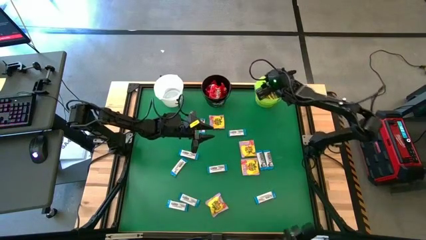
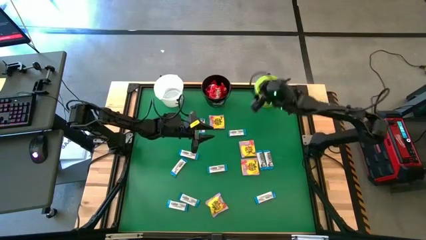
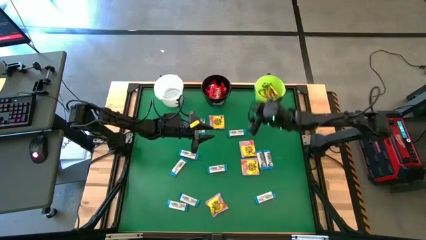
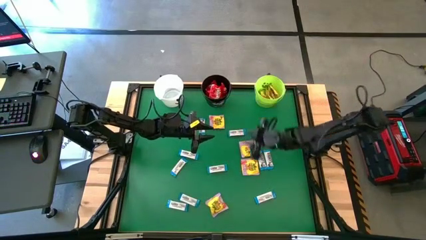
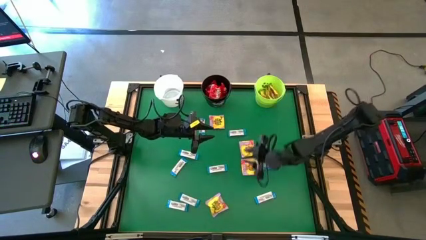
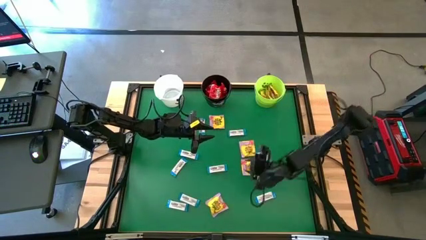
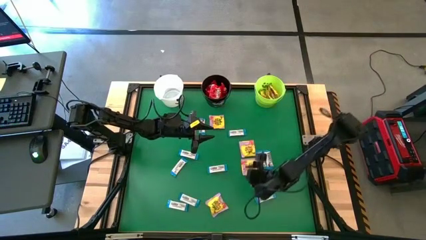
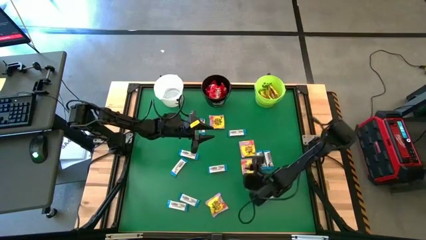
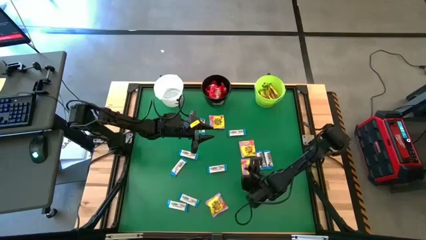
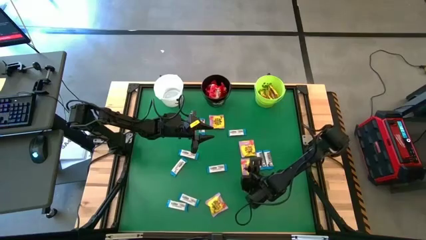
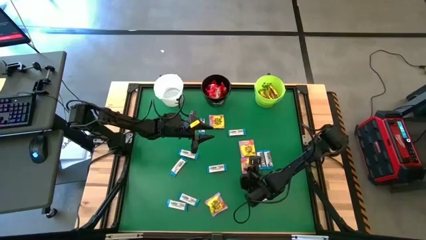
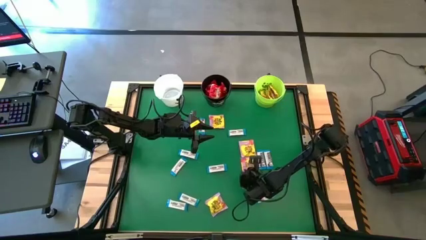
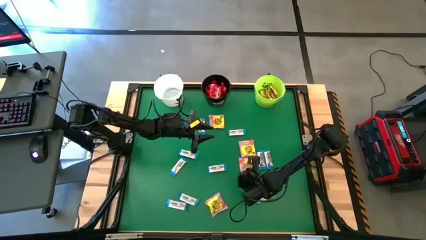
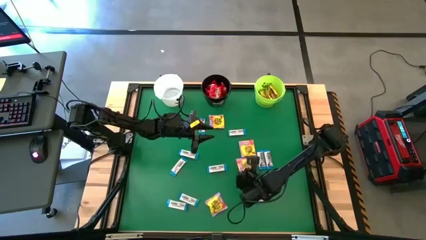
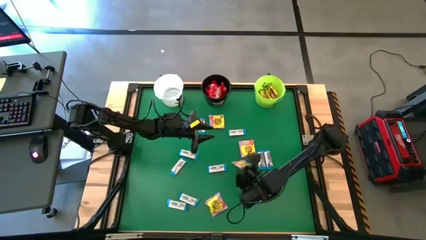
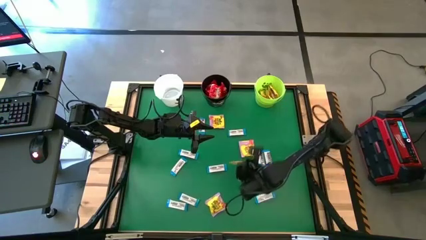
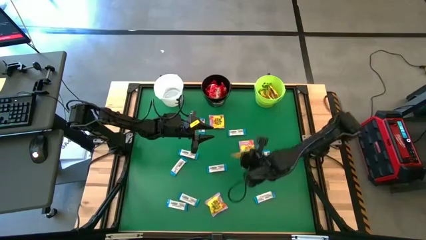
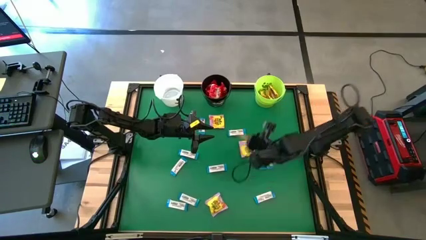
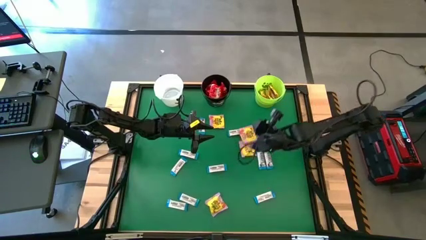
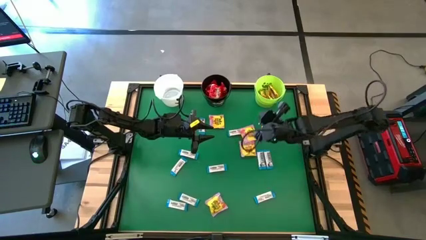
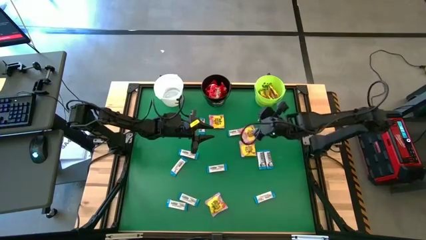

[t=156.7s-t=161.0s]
Task: Sort candy by brand, put in halloween buckets
Put the yellow candy into the green bucket

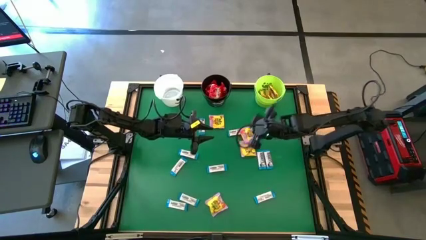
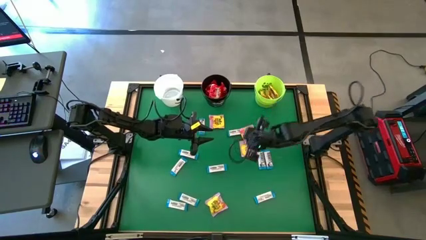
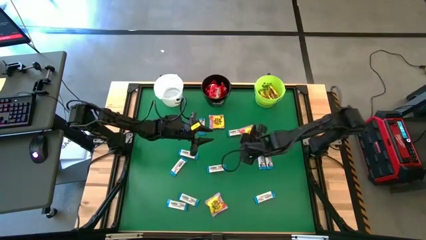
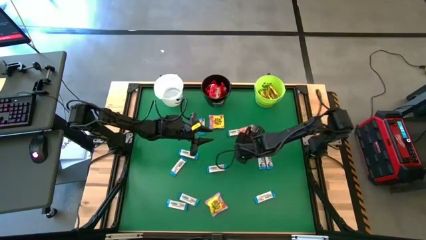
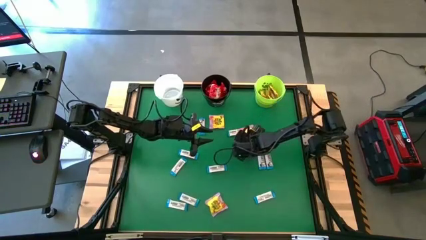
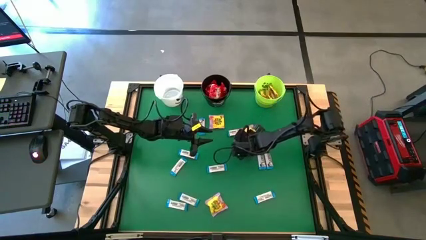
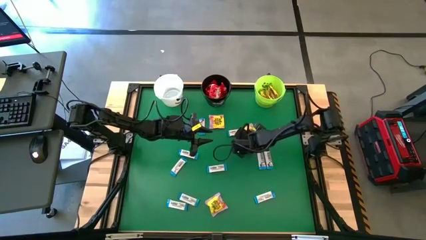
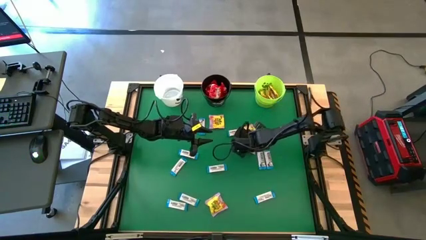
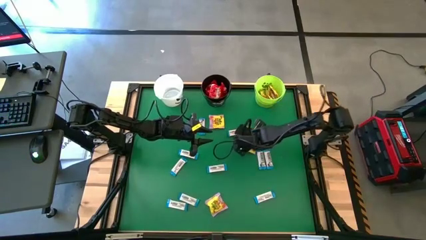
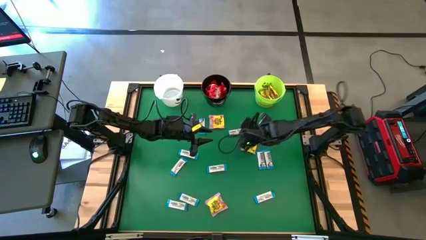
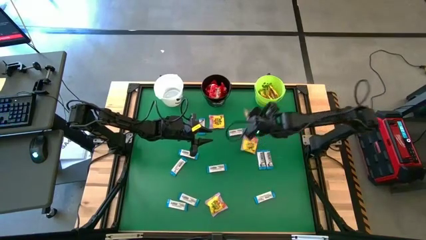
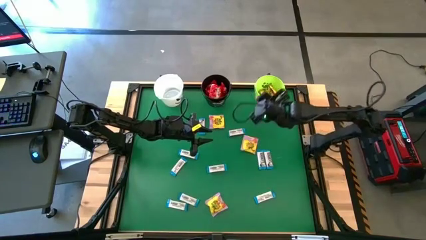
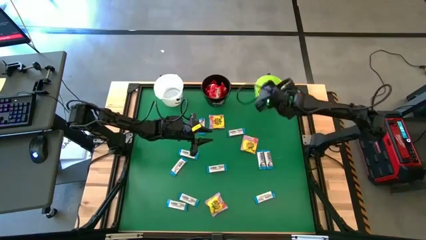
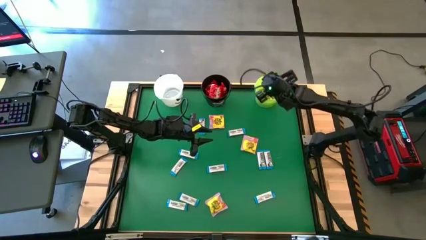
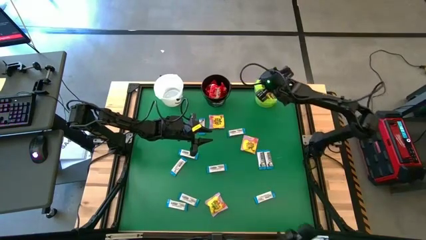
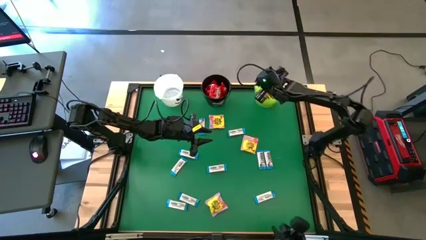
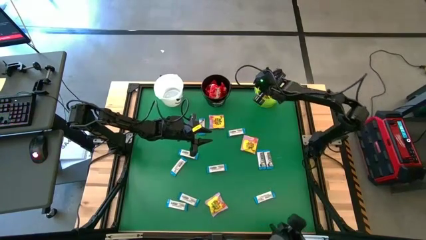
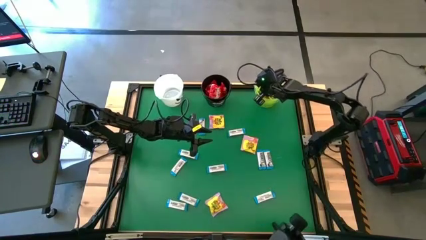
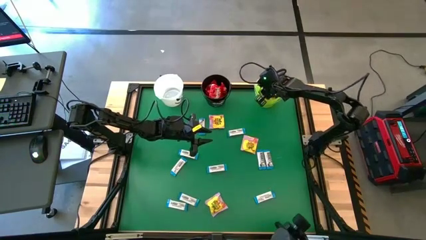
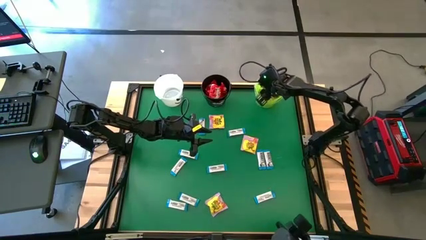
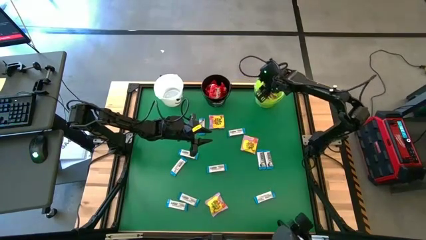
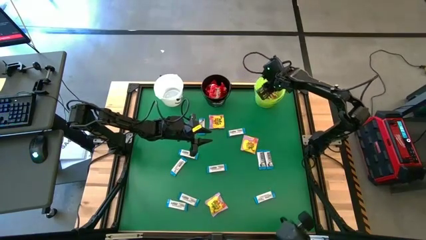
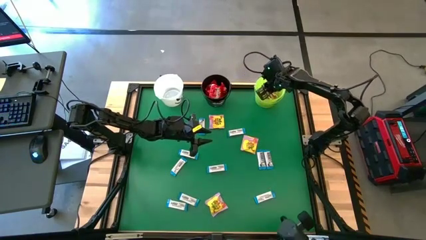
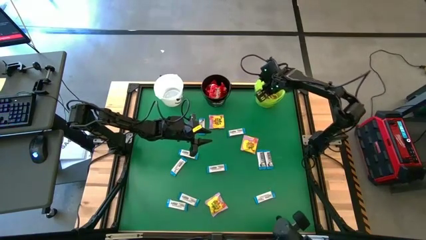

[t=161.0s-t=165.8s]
Put the yellow candy into the green bucket

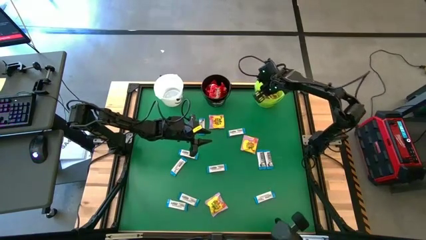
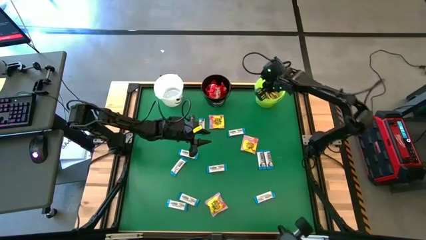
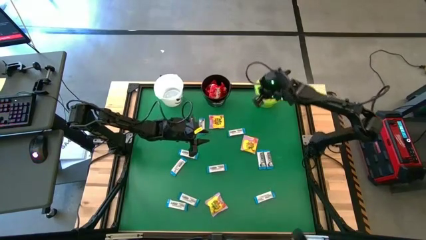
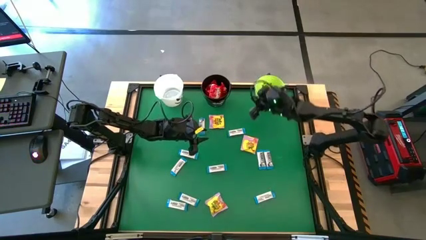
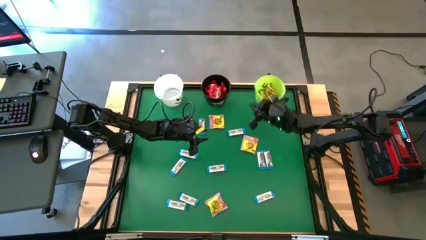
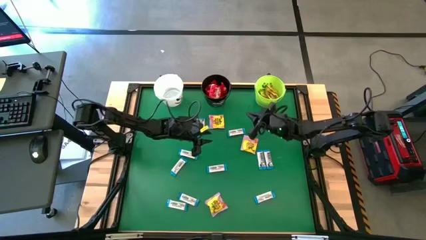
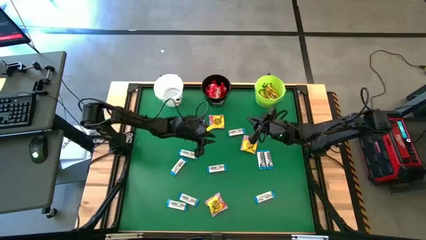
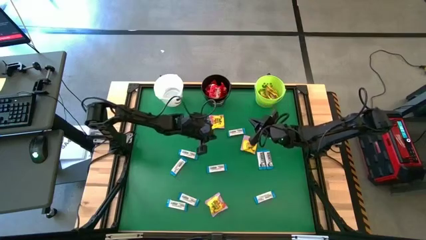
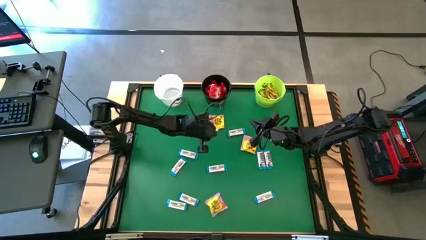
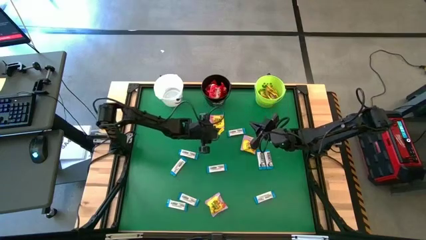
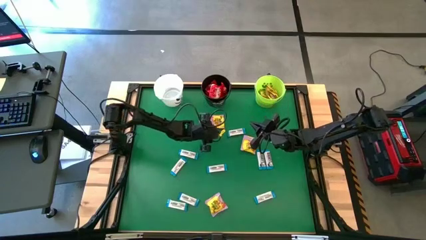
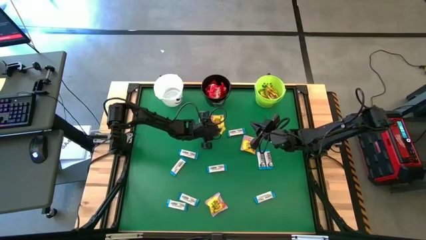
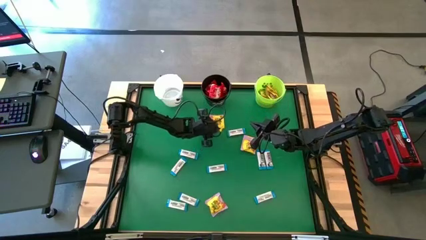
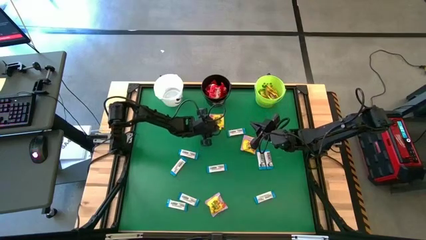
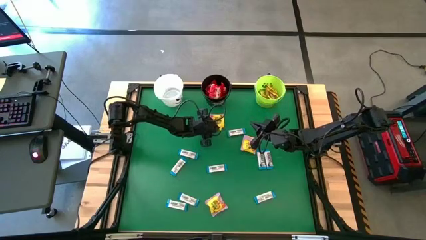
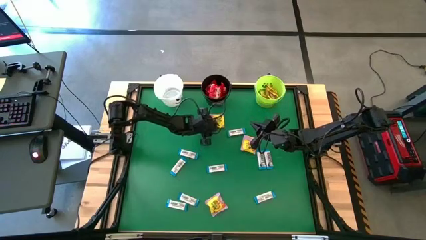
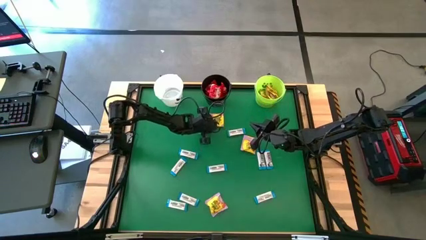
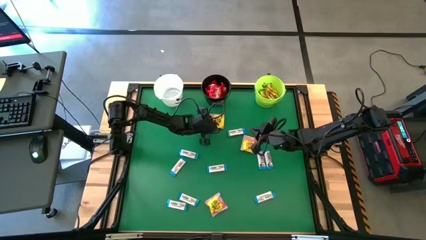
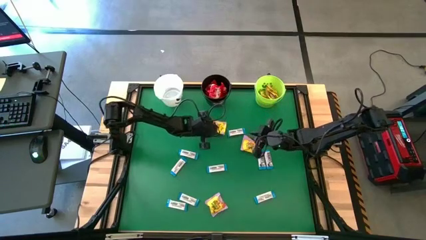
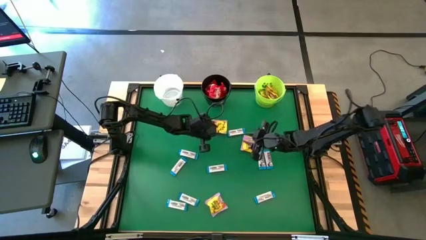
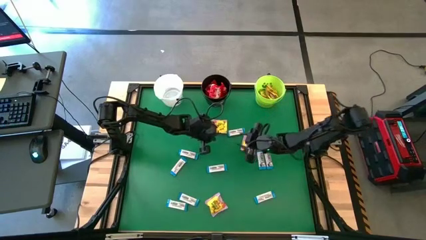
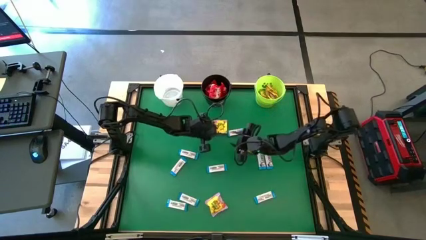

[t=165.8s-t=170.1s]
Put the yellow candy into the green bucket

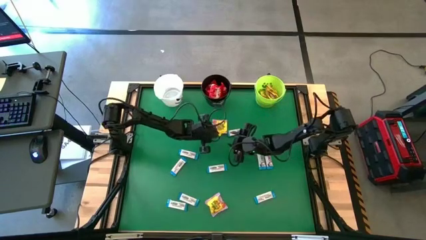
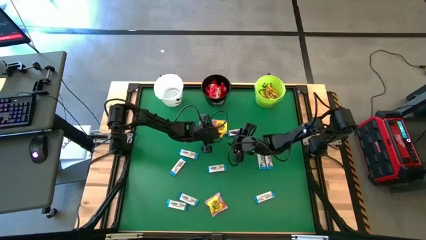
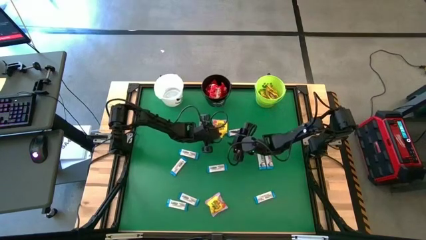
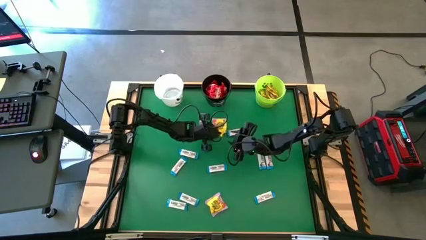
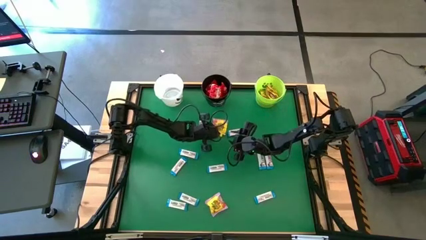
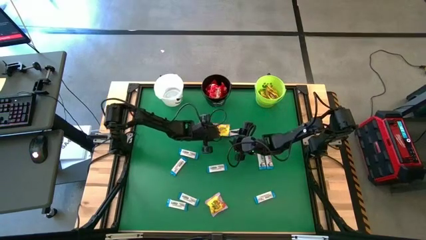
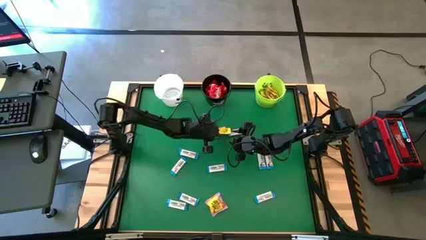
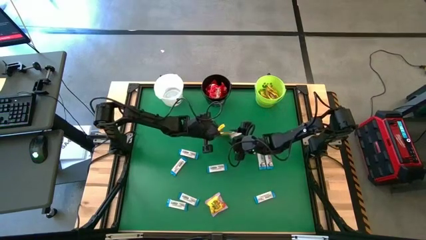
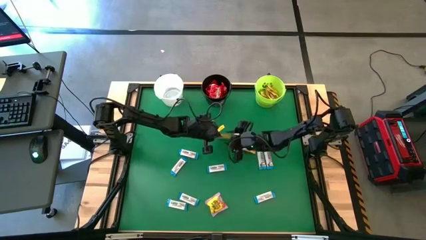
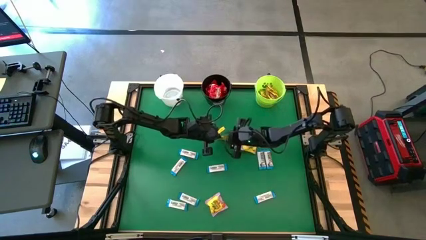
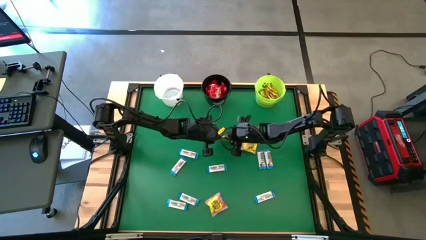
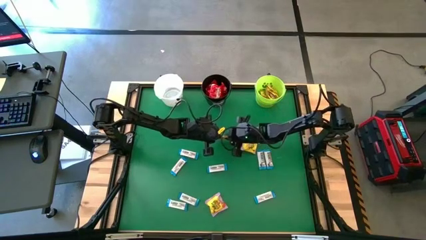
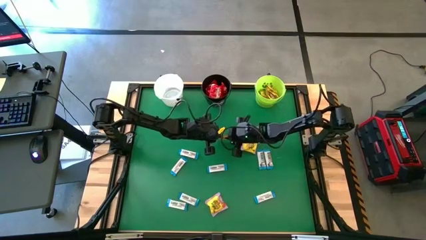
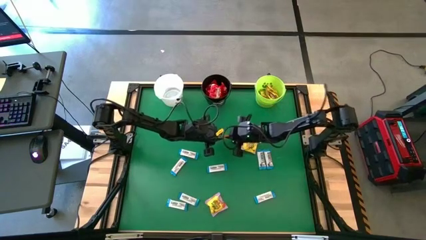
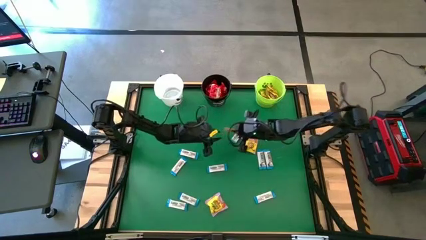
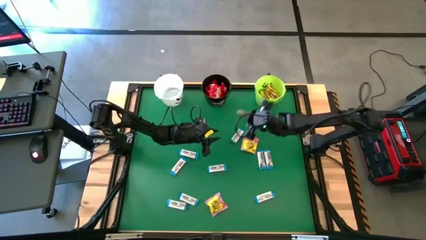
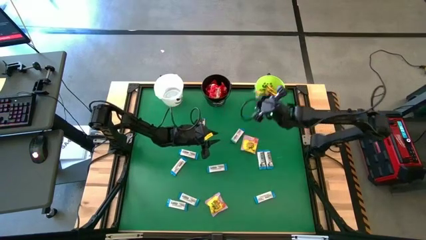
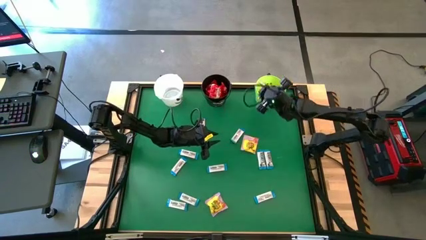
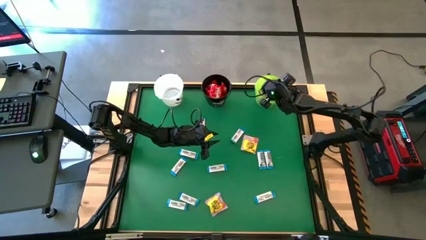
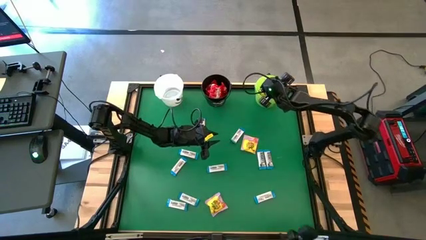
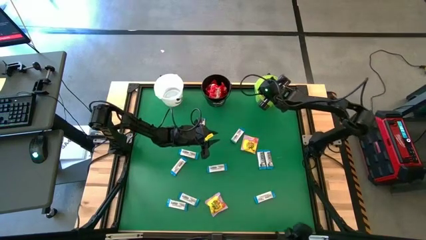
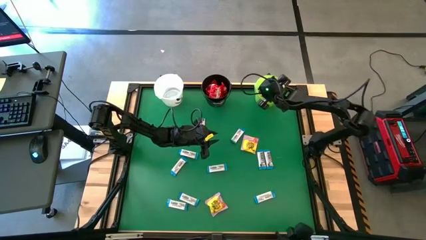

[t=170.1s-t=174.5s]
Put the yellow candy into the green bucket
